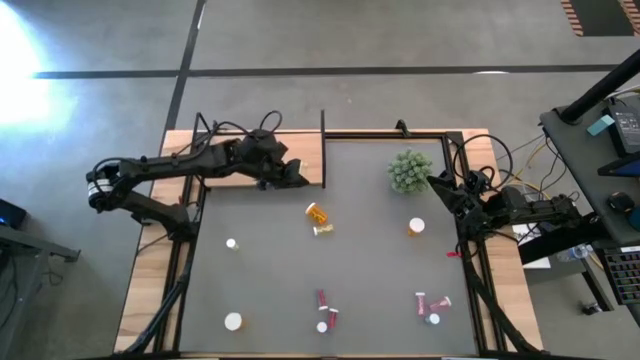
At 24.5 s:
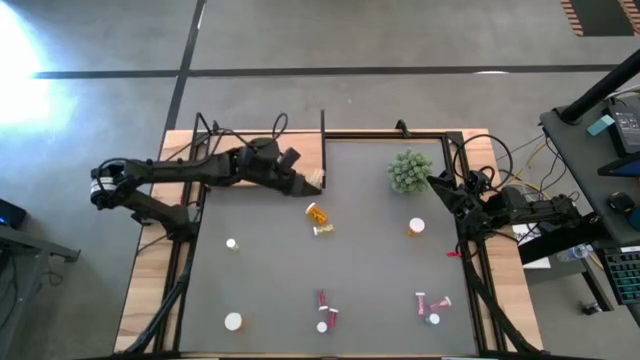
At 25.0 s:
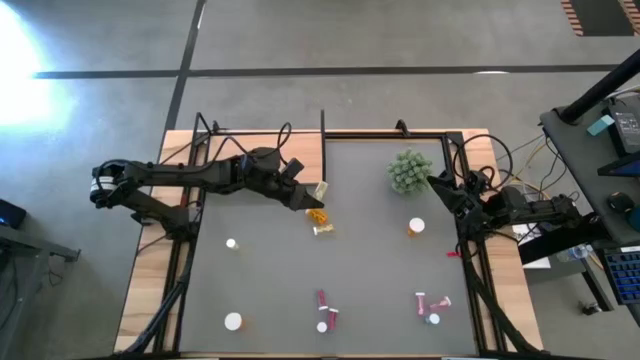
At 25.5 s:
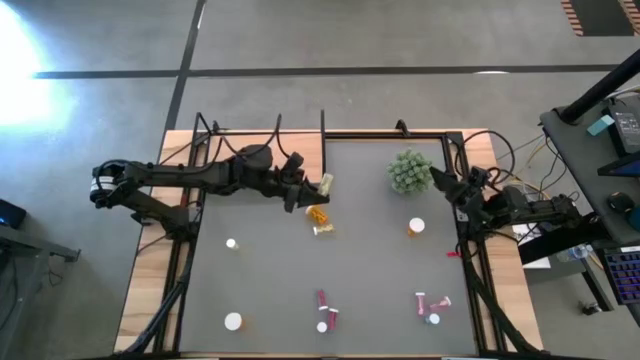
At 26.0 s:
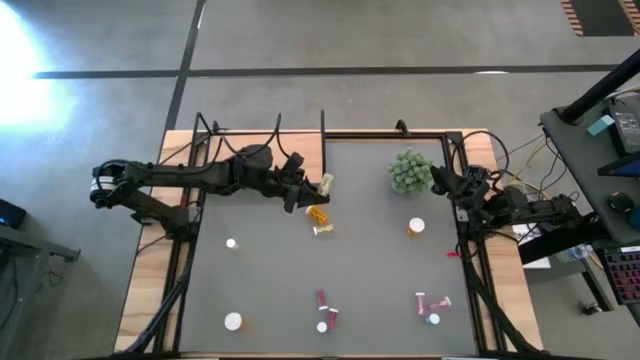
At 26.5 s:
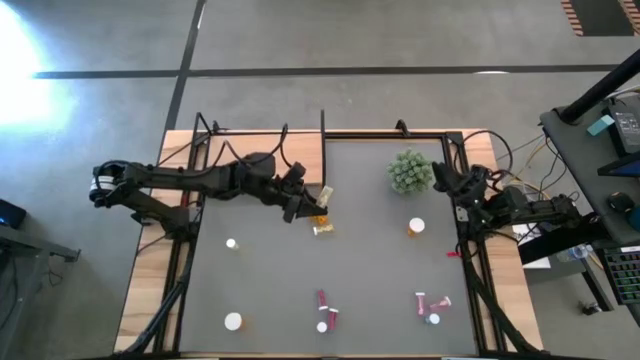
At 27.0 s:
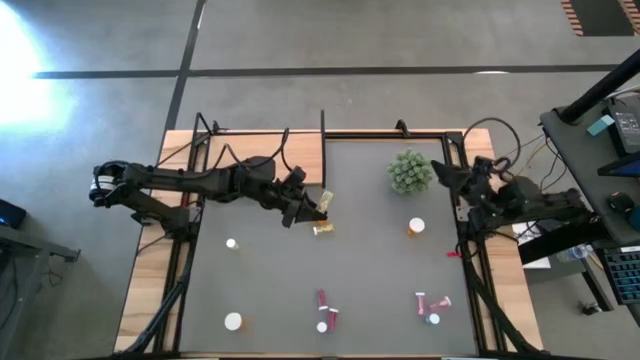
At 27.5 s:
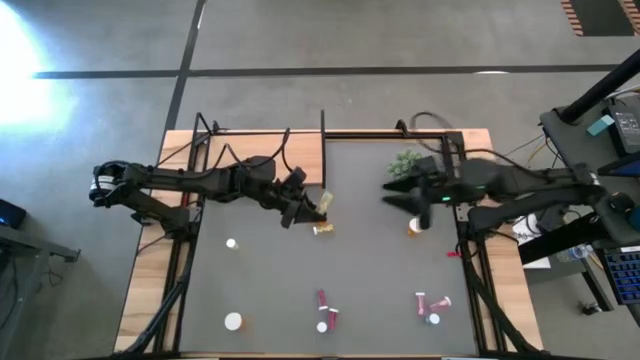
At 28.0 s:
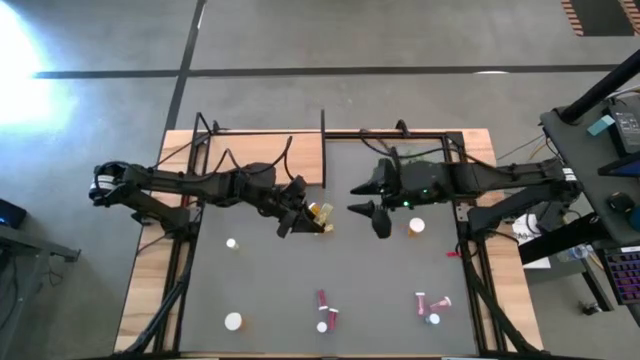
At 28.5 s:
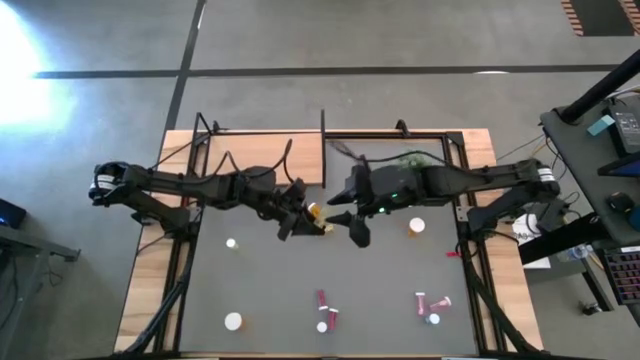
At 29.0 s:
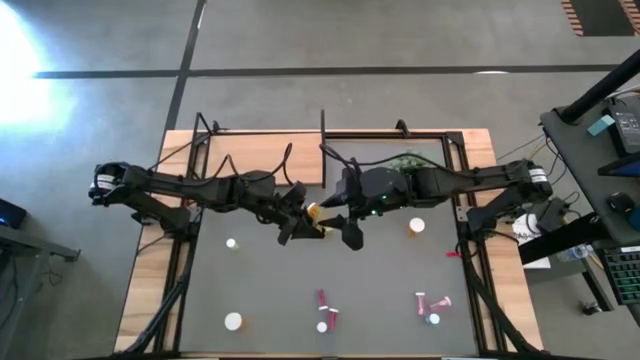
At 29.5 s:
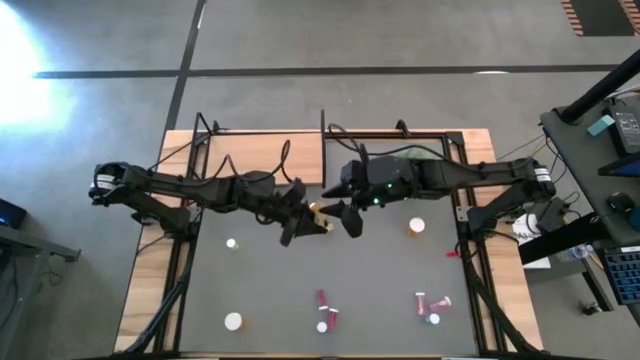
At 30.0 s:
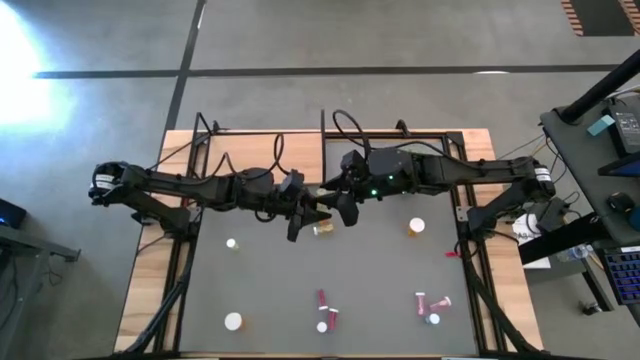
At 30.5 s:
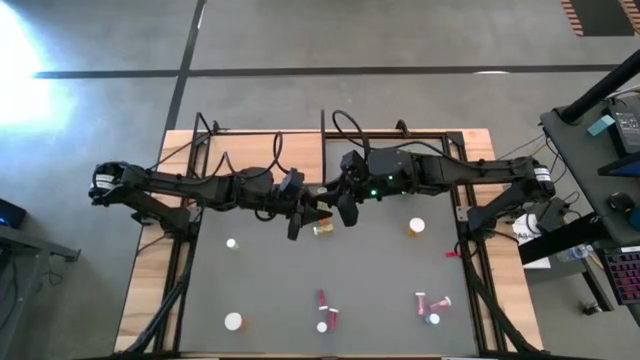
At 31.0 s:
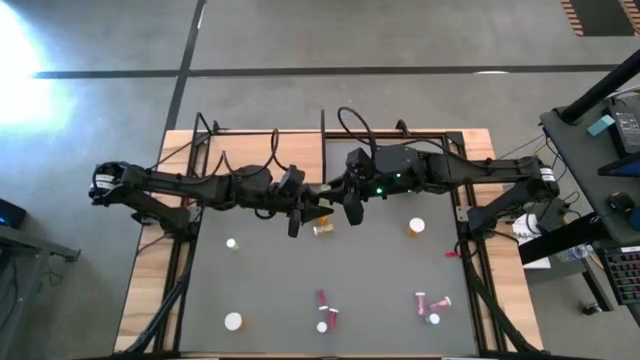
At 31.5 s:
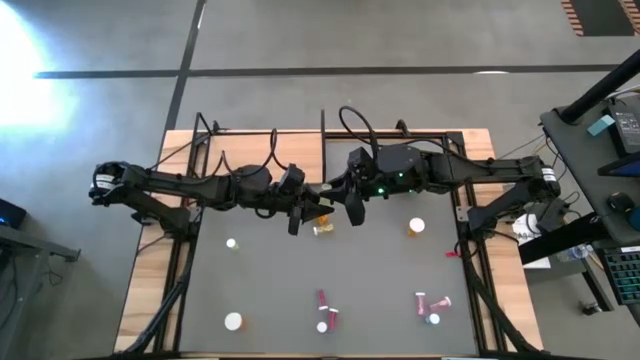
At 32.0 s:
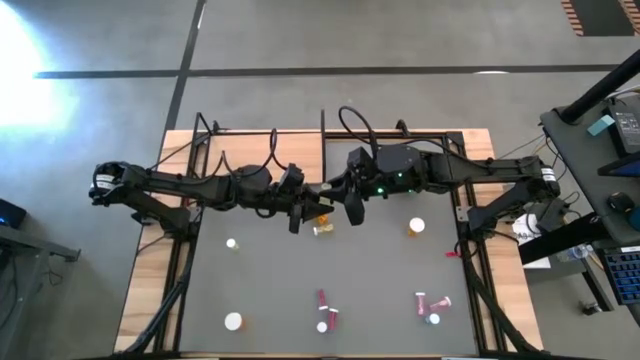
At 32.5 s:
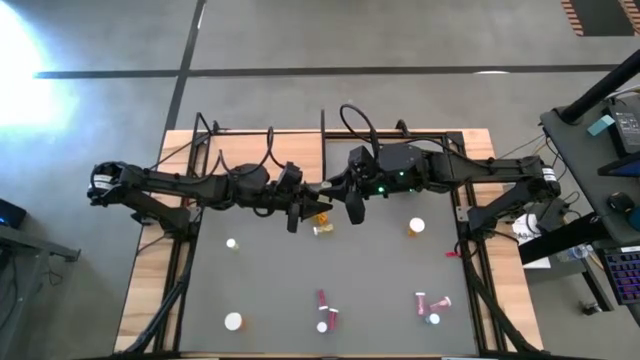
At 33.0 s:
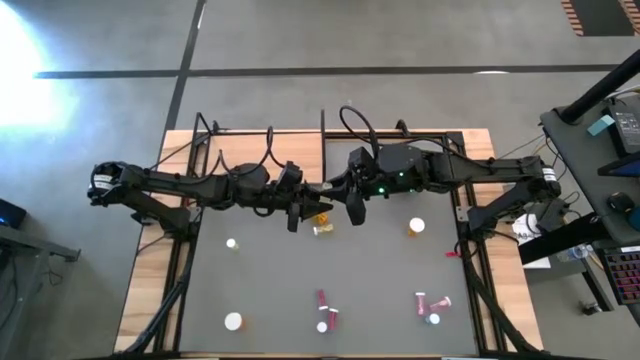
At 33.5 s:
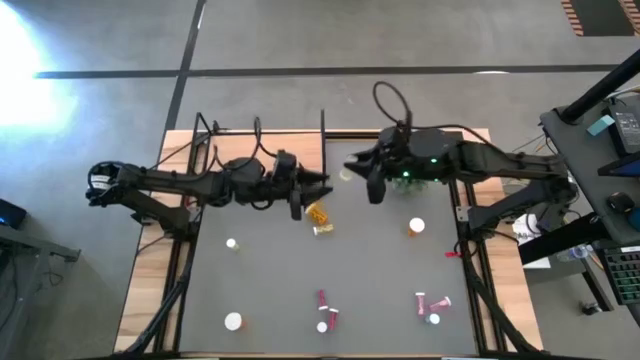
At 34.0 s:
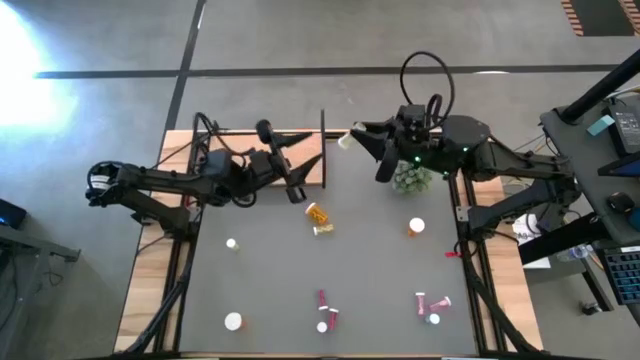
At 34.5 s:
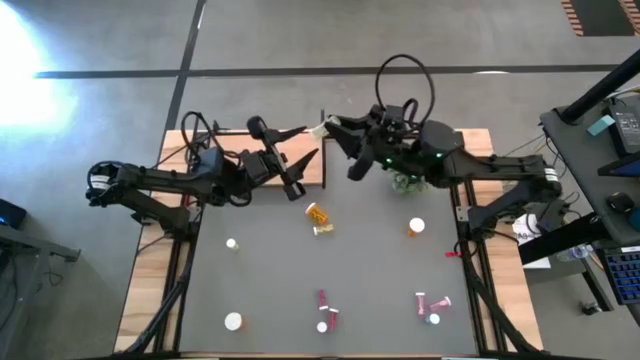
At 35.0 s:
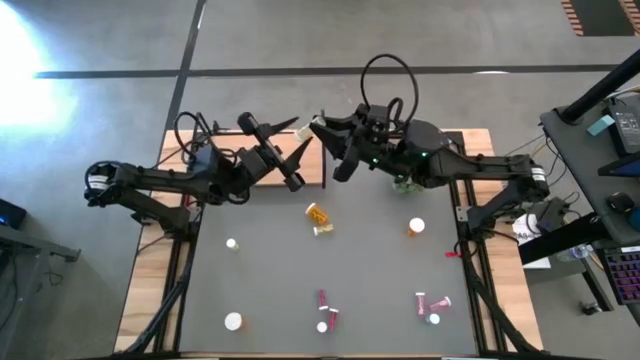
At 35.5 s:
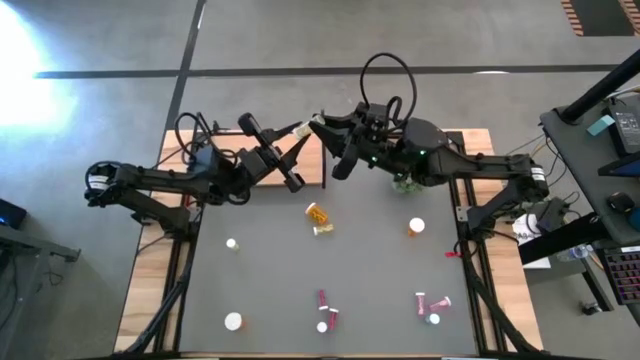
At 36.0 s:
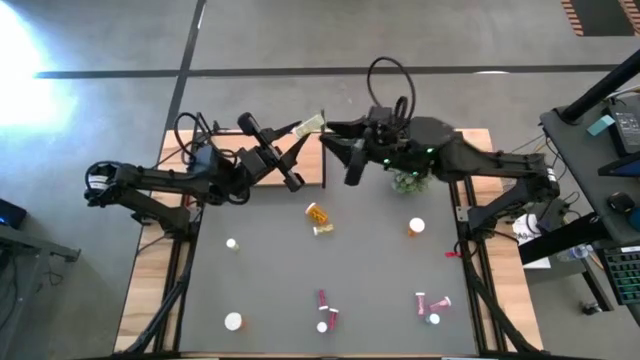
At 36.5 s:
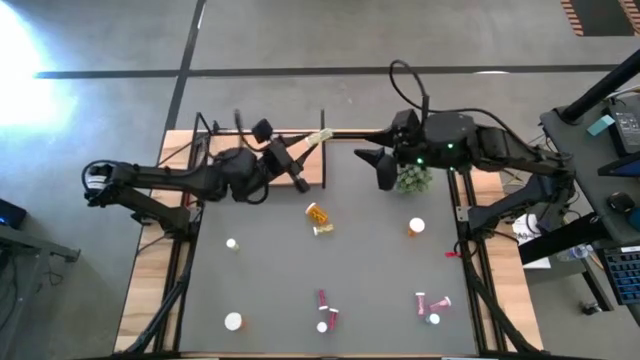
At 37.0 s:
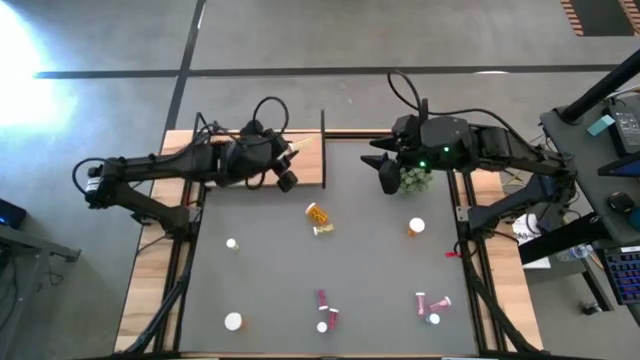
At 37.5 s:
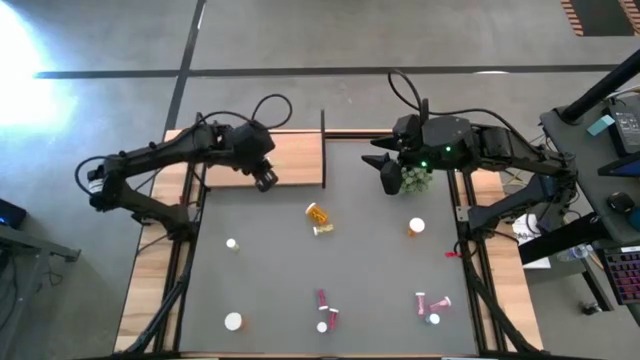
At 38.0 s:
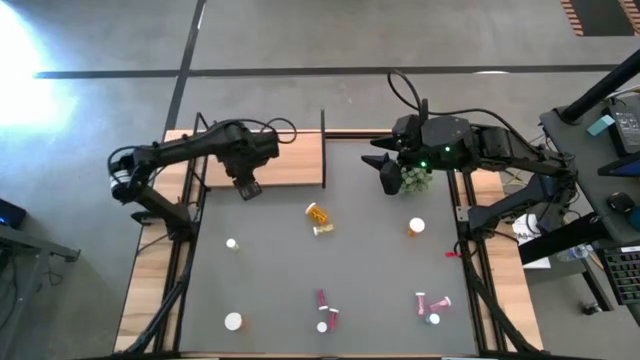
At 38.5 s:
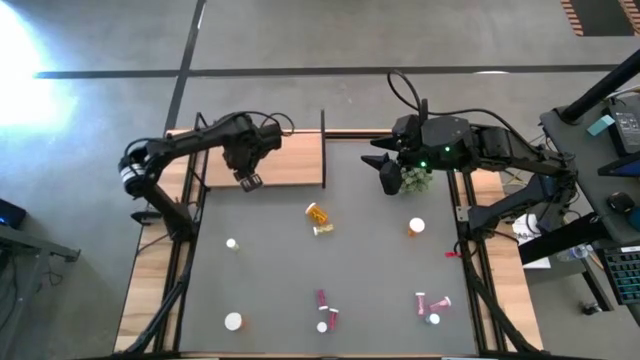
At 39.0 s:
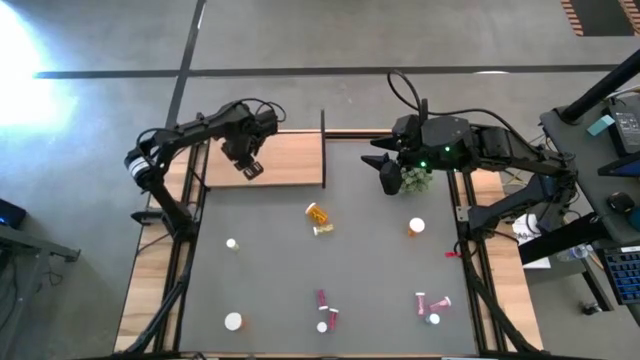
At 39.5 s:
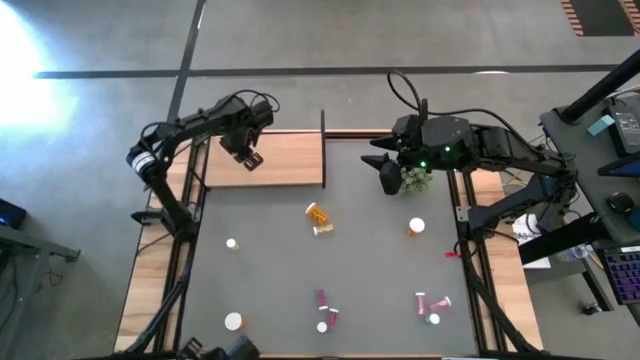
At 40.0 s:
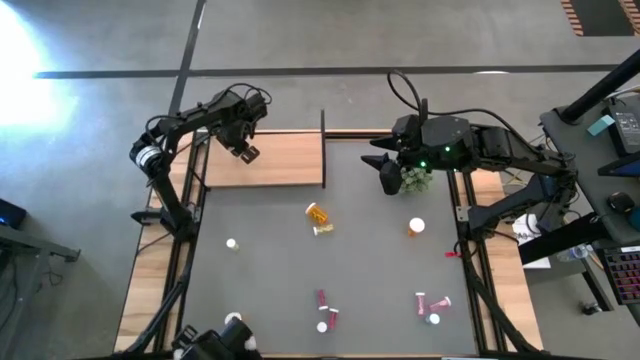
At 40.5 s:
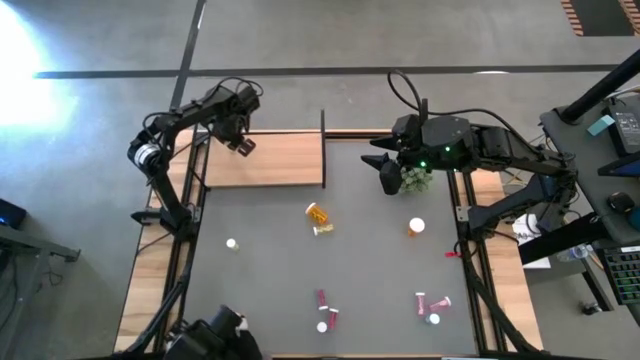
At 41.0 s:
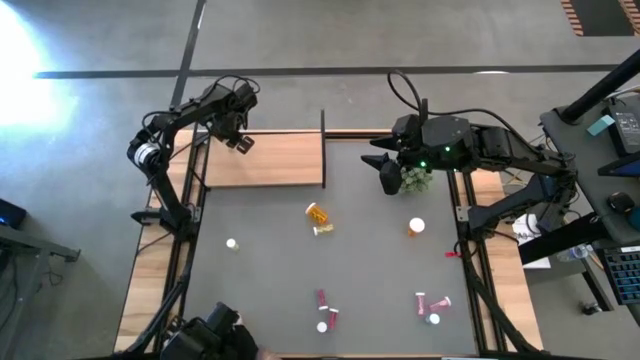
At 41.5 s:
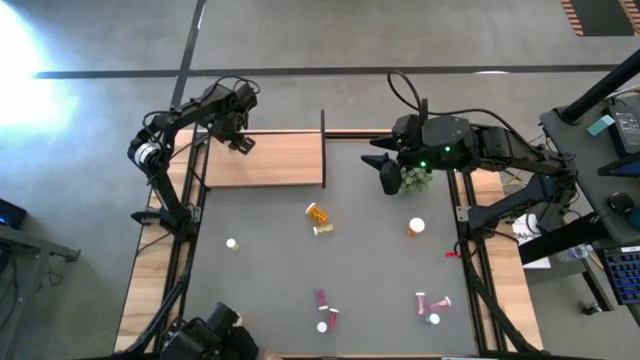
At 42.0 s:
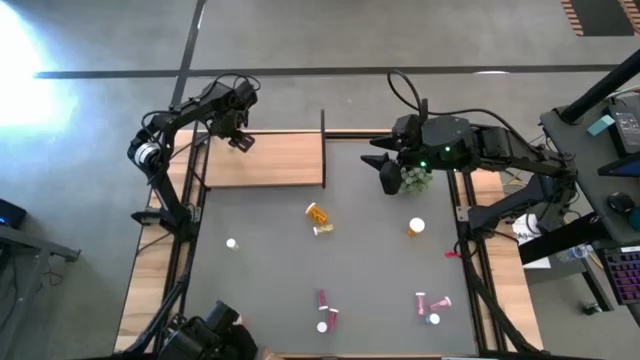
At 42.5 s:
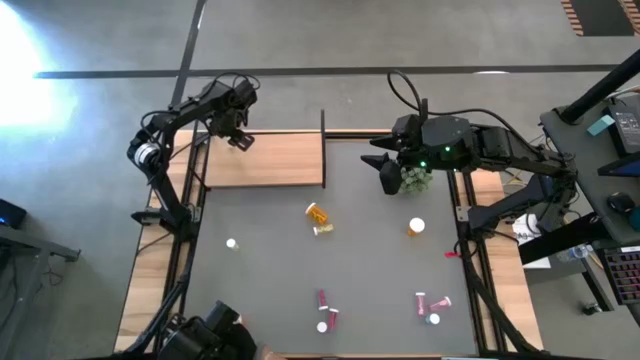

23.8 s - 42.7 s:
Task: Pick and place medicine bottles onto shelf by color
Put the top left yellow pill bottle on the shelf
